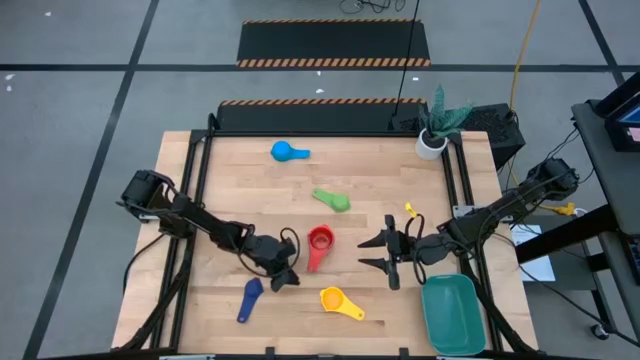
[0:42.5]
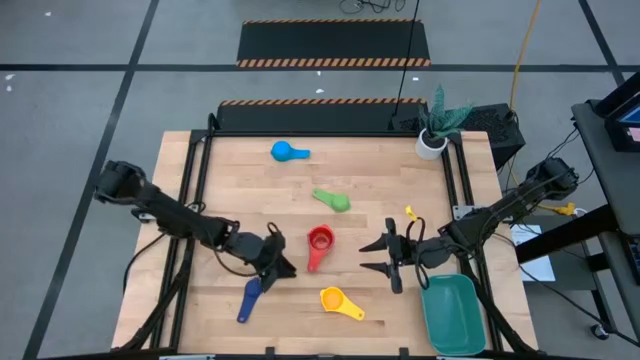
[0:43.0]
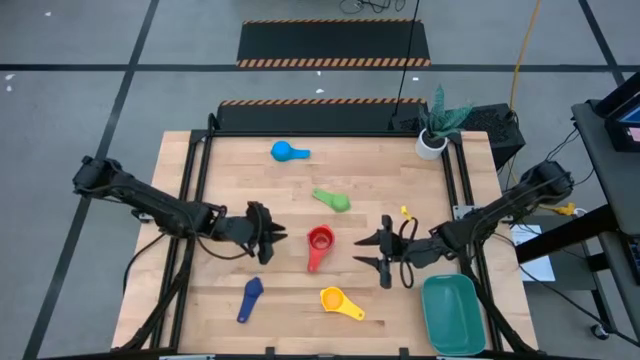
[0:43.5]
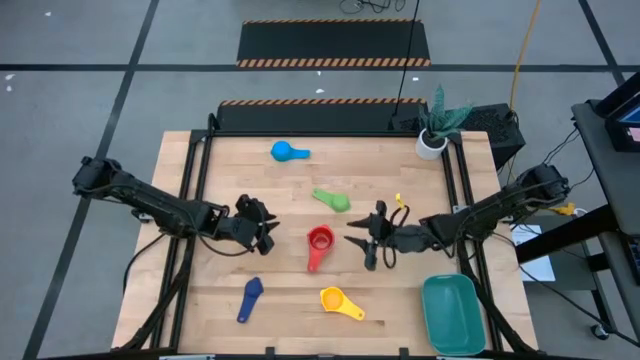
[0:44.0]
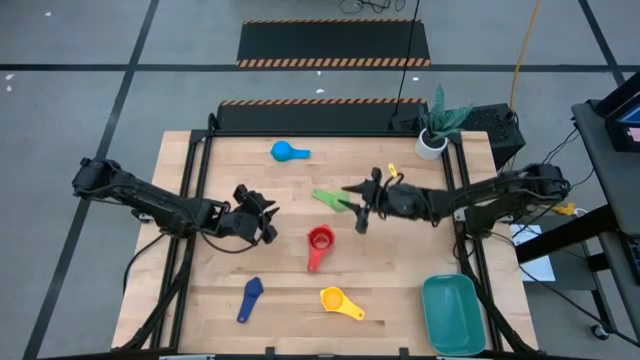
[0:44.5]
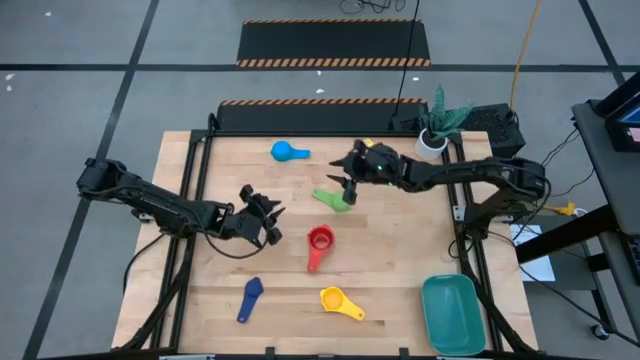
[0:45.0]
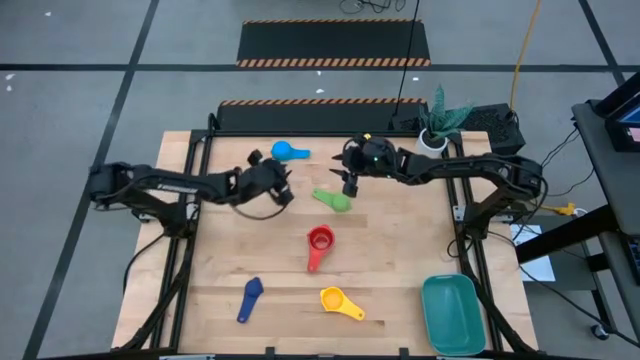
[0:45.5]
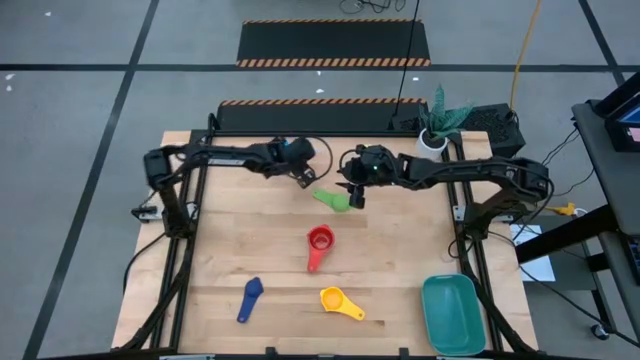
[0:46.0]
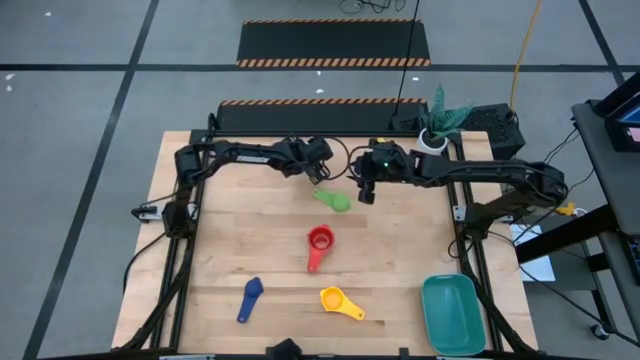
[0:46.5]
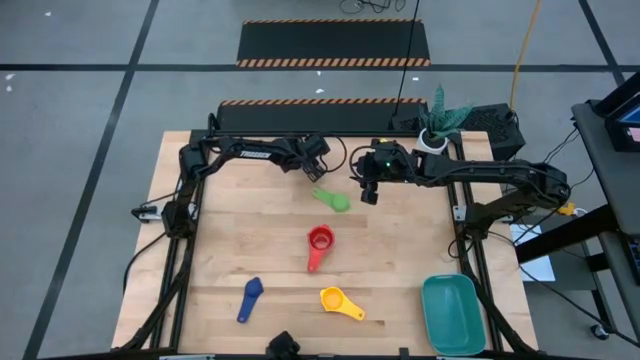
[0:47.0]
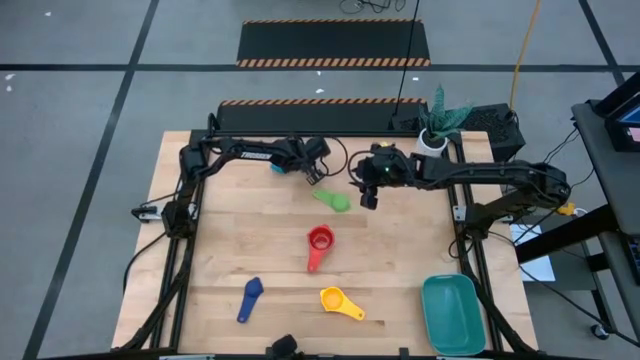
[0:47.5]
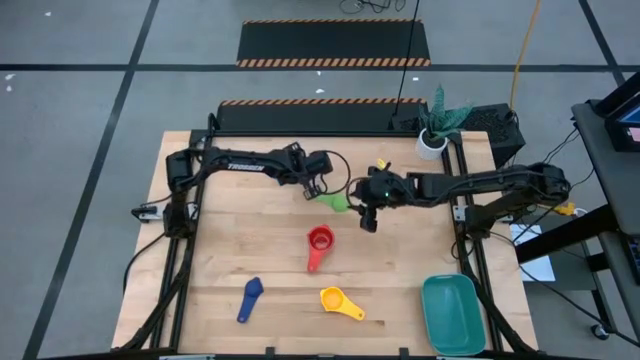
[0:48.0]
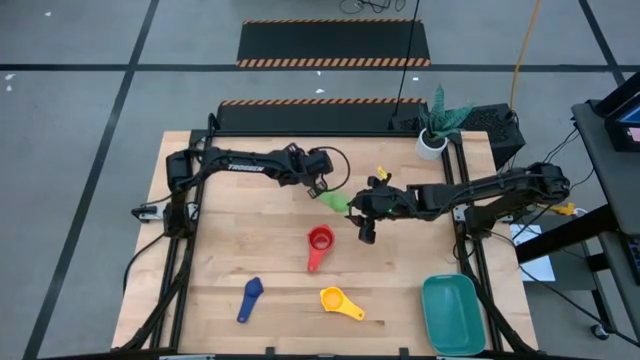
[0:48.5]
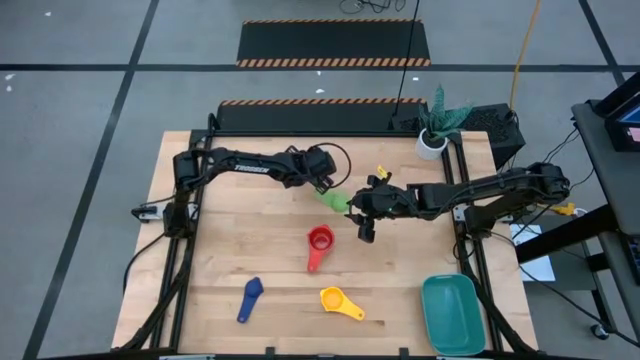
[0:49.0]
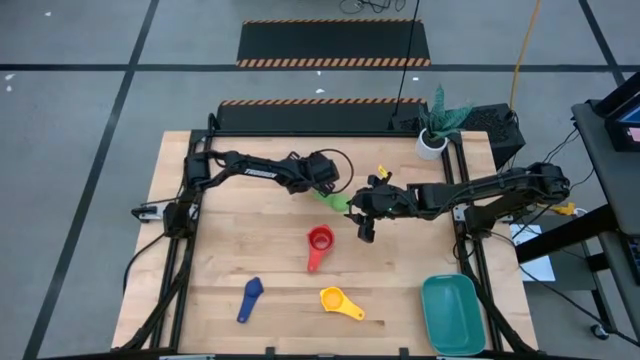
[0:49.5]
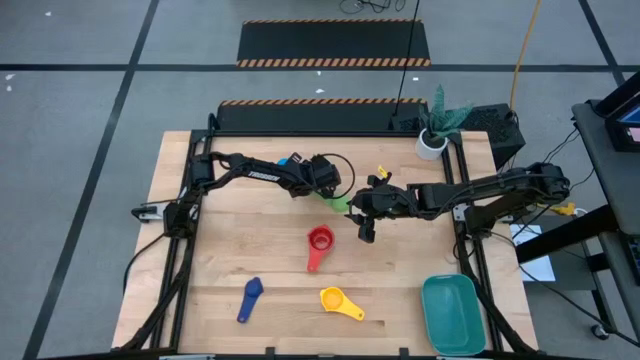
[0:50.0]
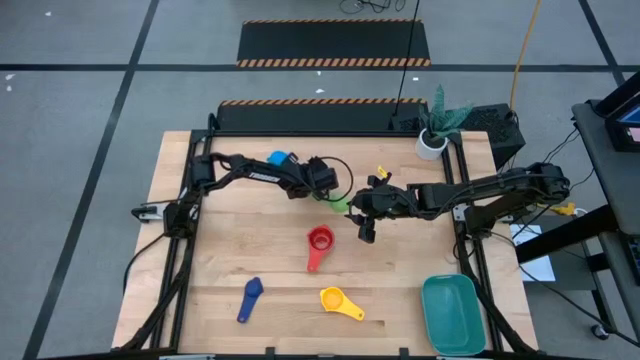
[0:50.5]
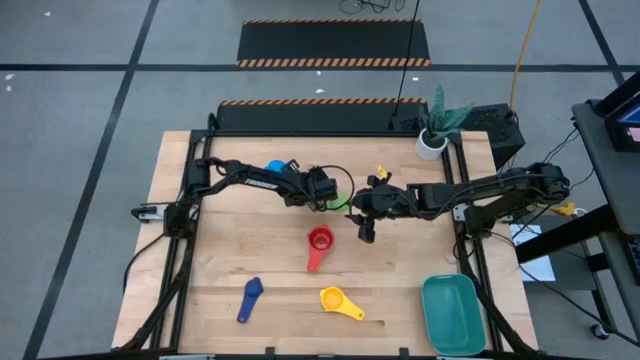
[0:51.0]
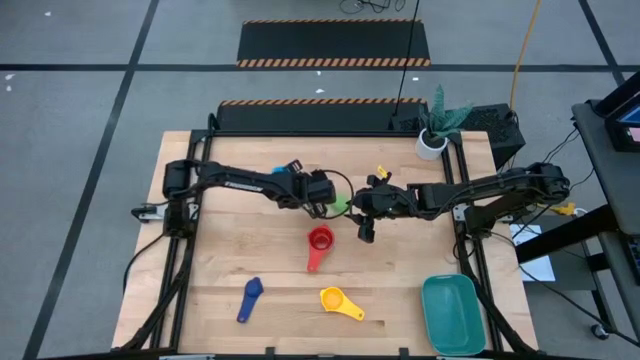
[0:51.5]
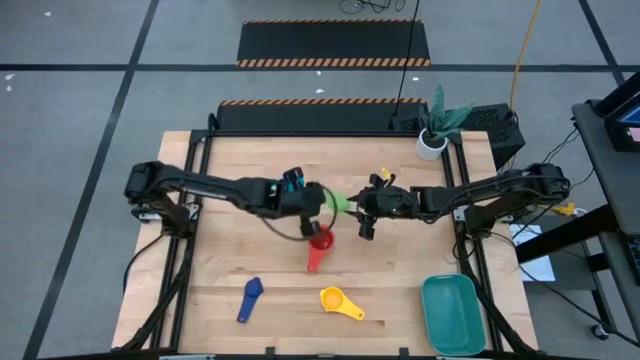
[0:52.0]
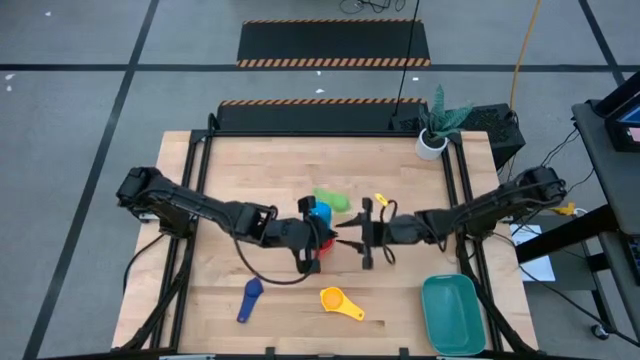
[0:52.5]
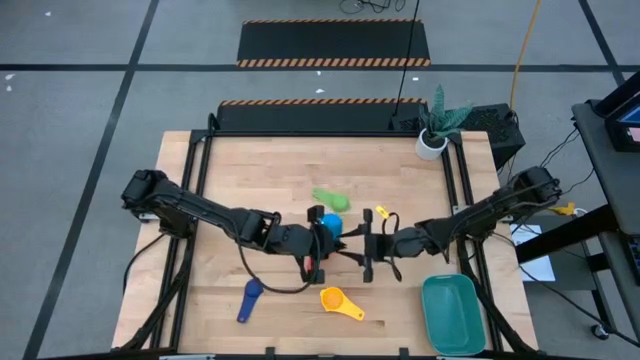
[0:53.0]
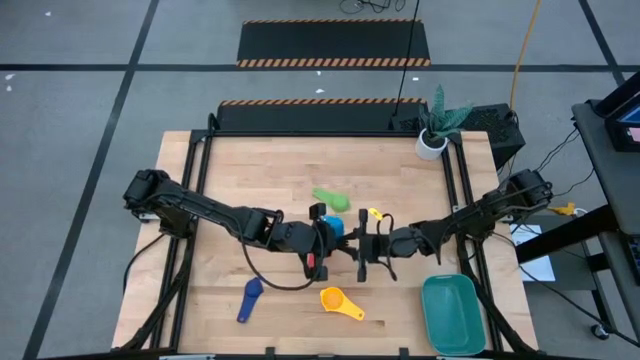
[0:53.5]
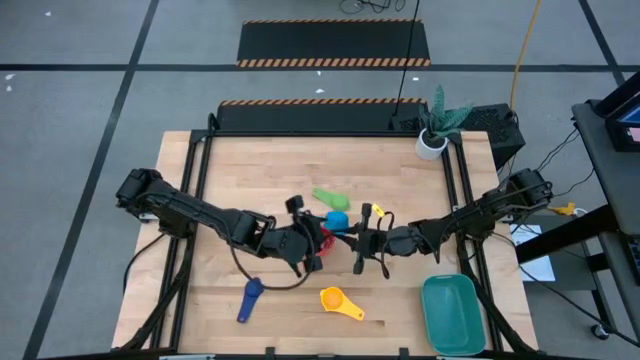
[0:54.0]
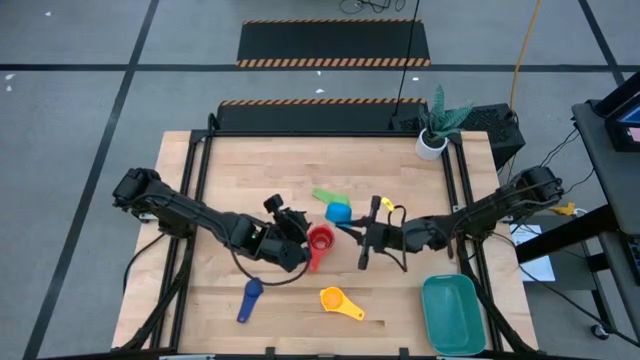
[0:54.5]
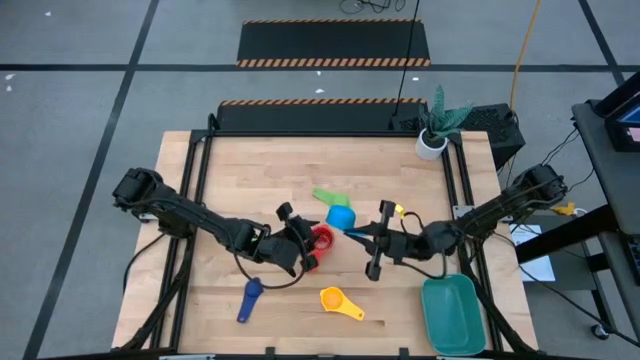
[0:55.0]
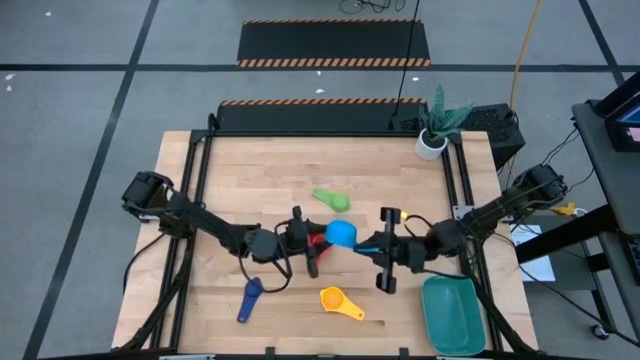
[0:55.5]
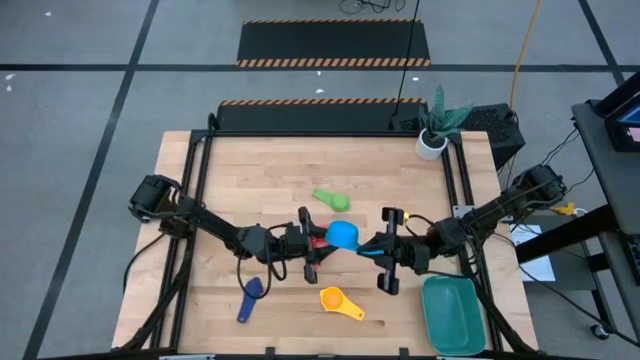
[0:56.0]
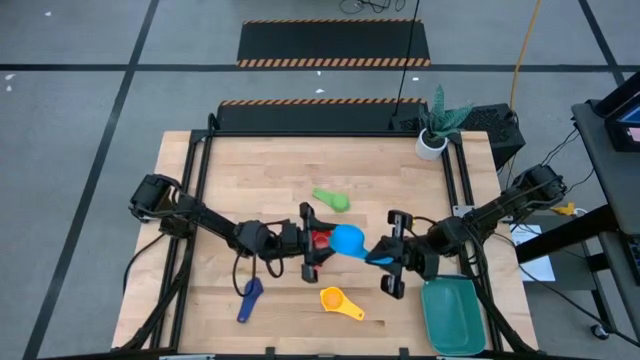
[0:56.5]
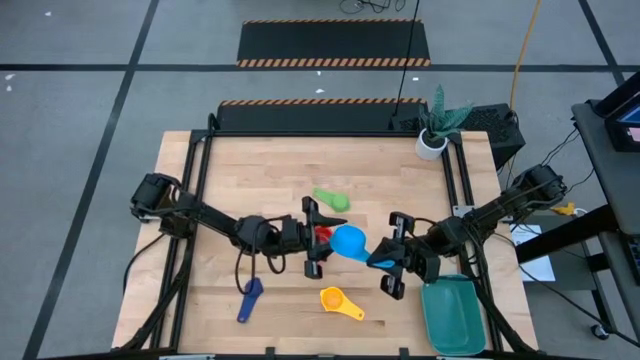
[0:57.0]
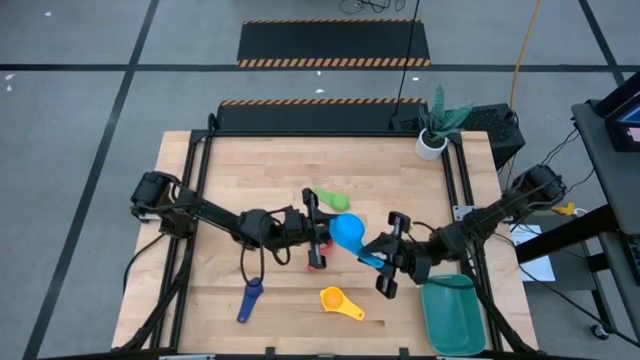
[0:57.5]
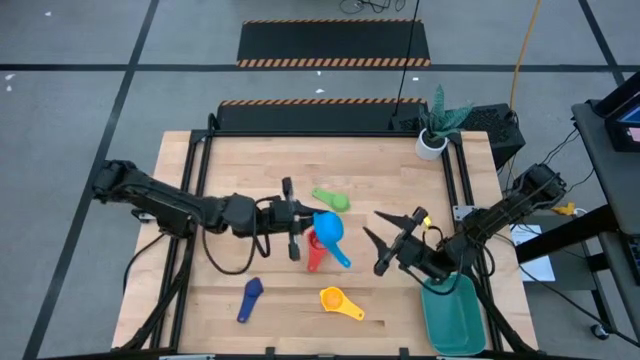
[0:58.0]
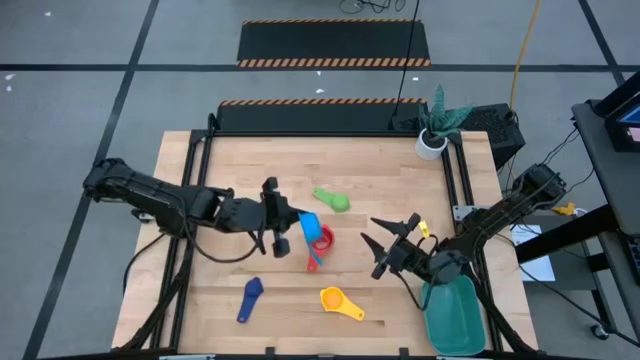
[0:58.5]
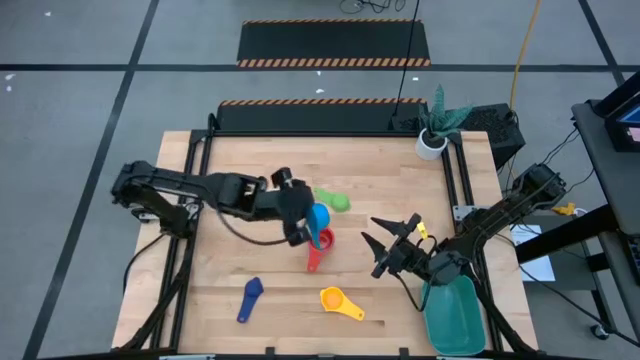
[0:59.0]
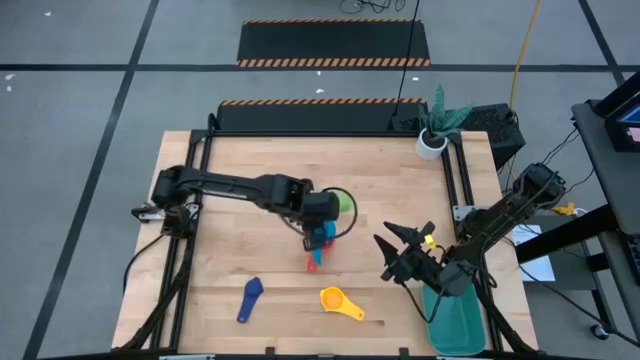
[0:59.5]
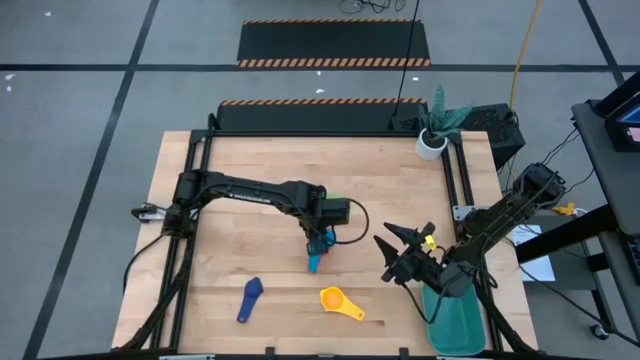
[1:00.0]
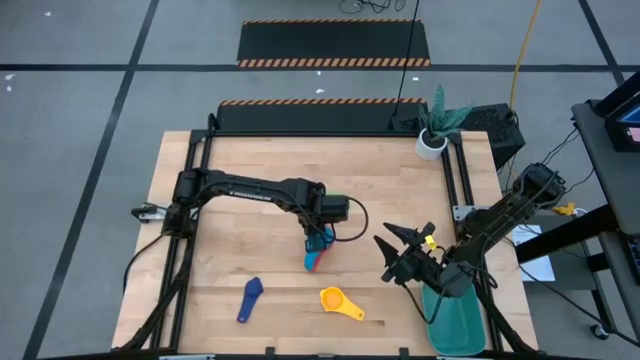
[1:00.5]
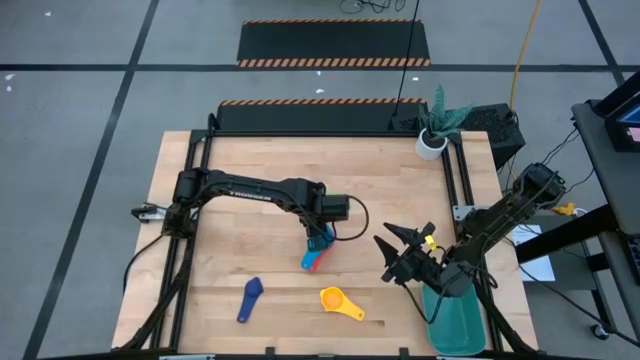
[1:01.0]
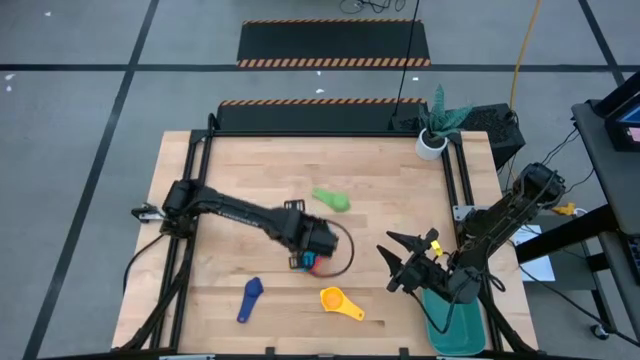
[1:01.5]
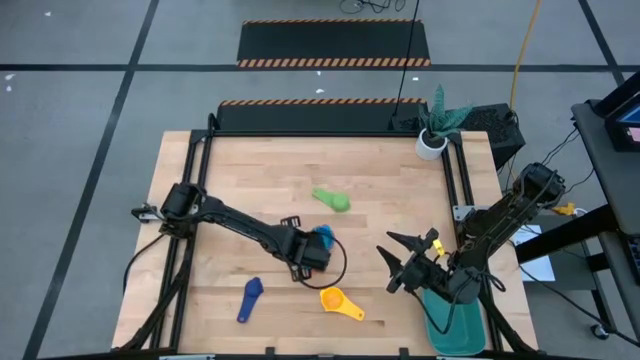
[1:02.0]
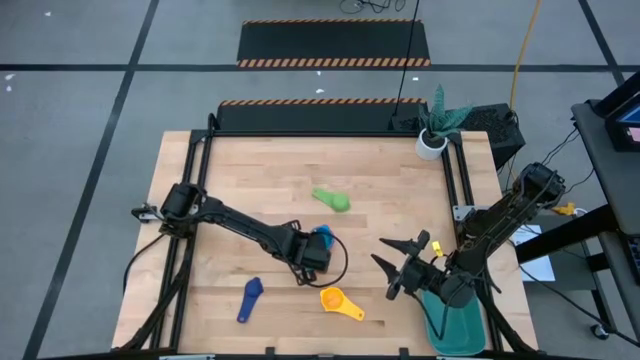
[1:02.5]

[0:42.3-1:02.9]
Task: Nest measuring cups in basket
Stack the light blue measuring cup on top of the red measuring cup

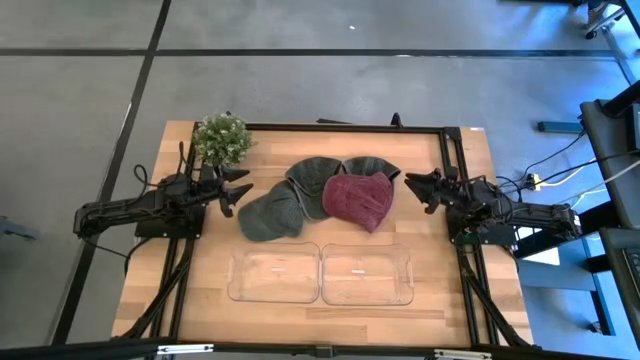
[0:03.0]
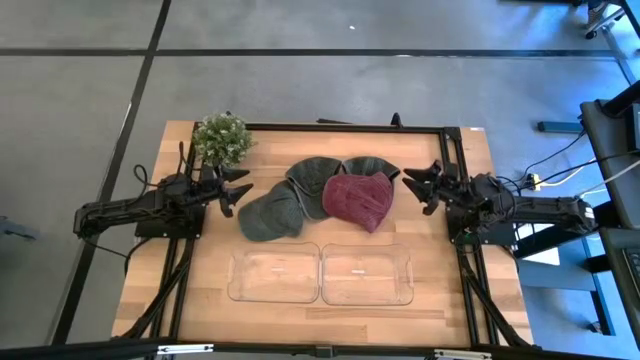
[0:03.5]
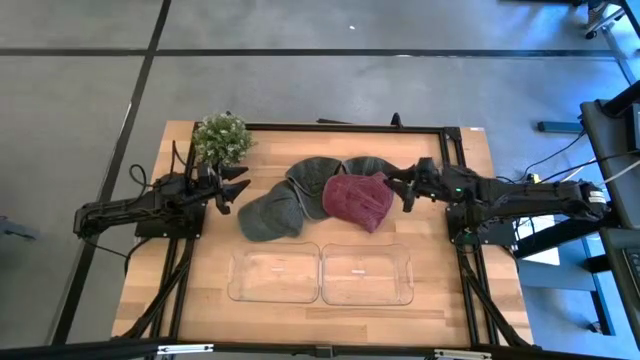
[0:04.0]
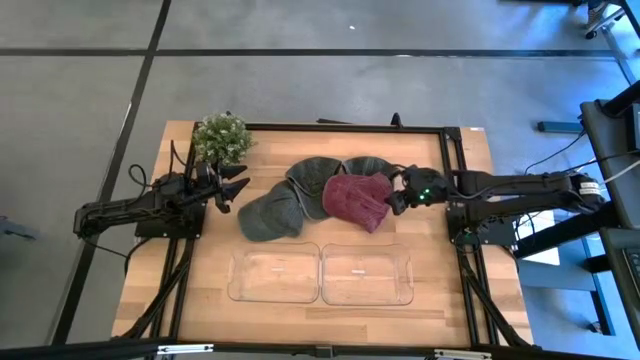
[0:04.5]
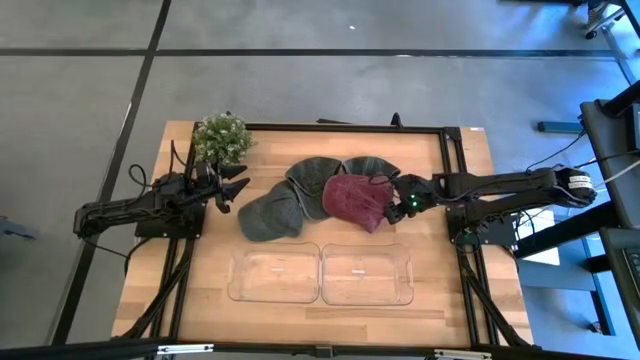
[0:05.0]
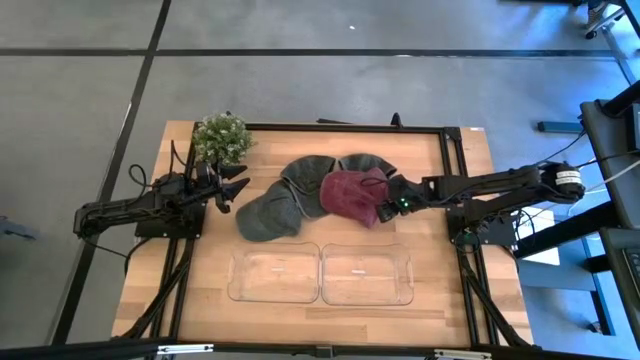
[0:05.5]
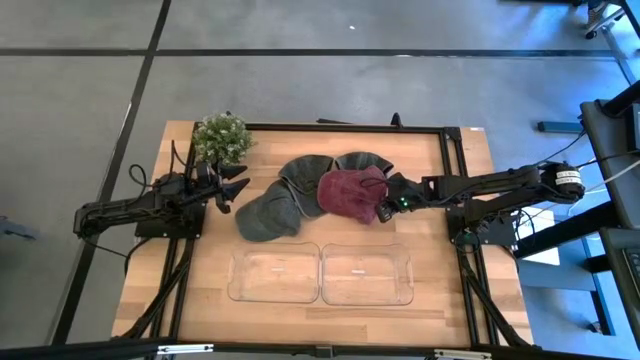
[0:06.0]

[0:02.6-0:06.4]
Task: Pick & Place hat
Put the red cap into the right transparent bin
